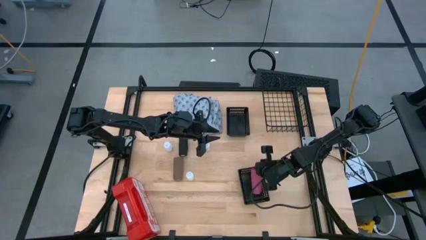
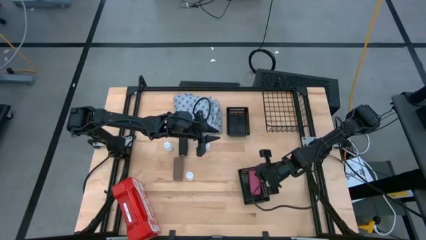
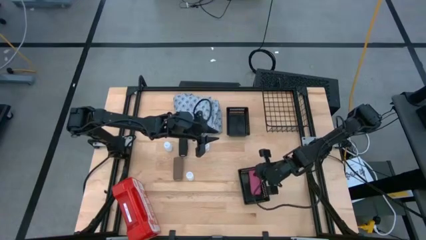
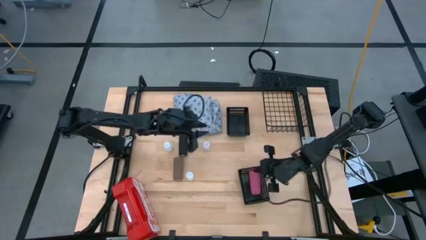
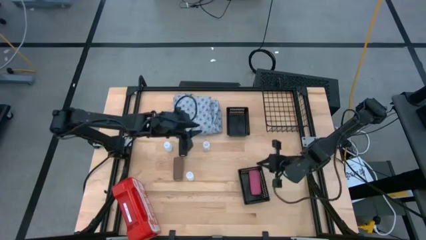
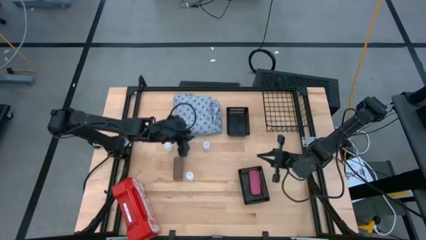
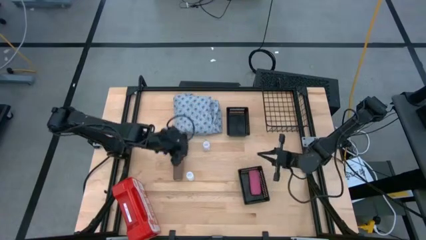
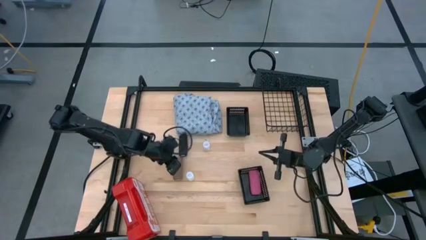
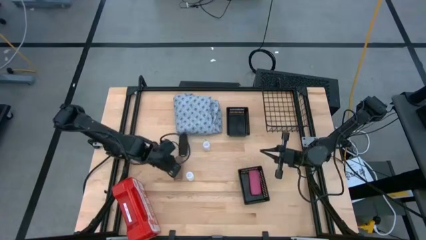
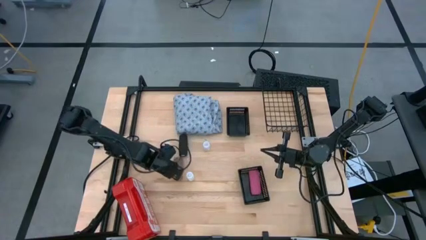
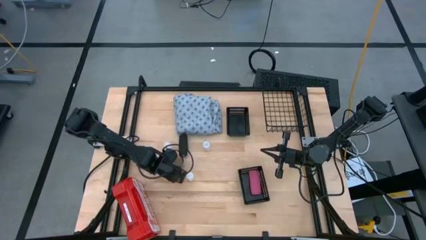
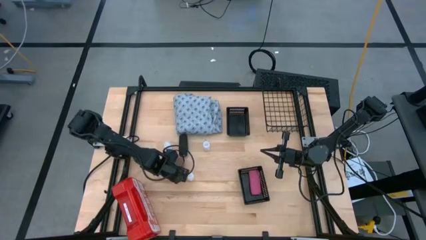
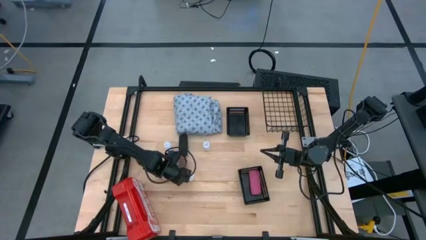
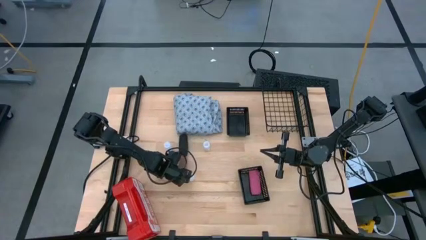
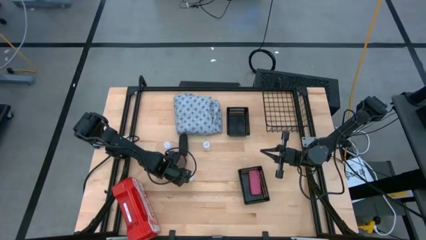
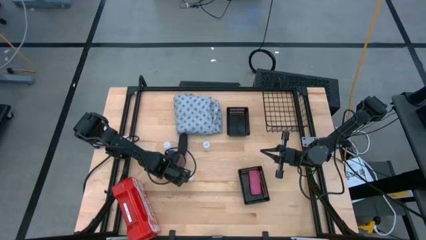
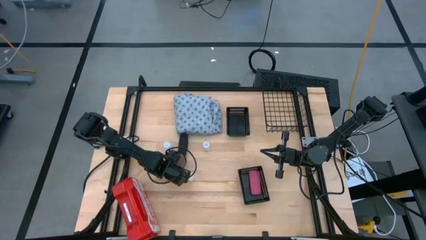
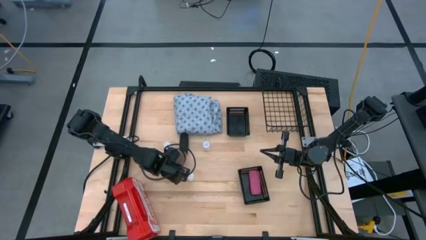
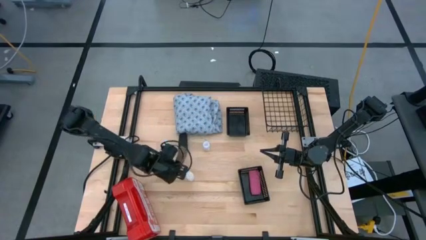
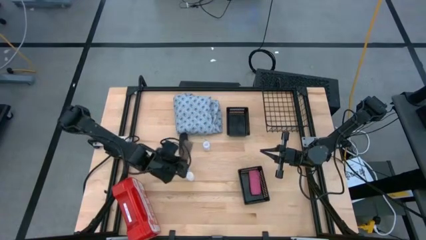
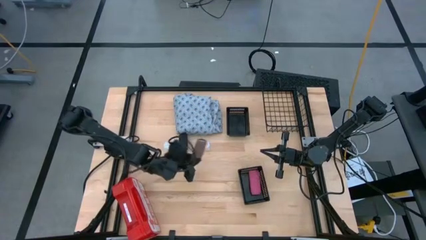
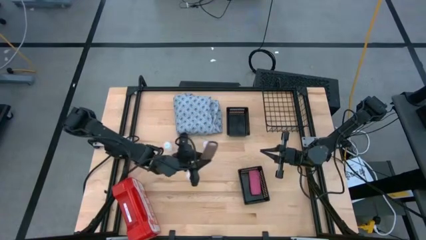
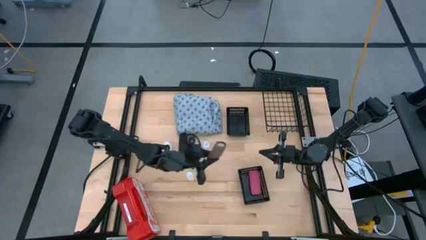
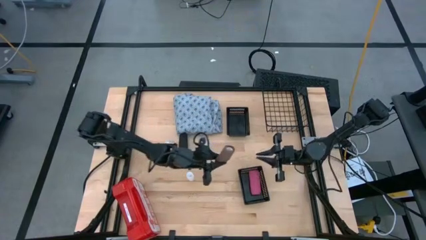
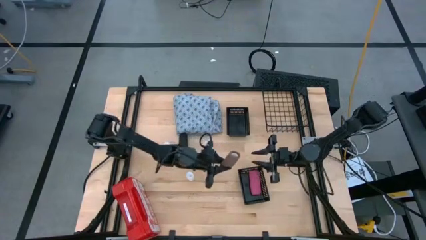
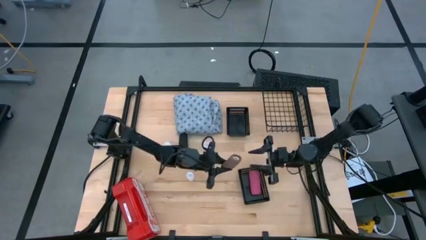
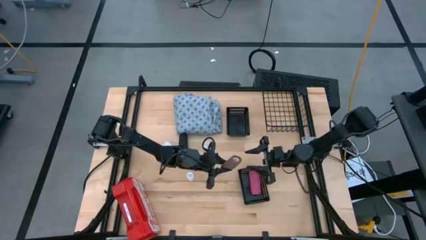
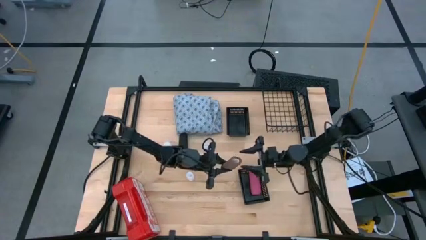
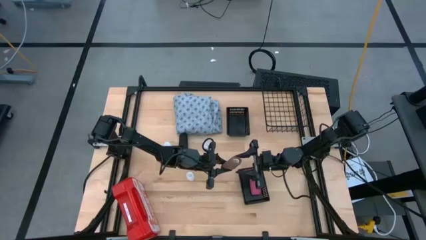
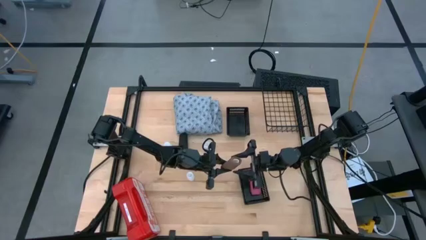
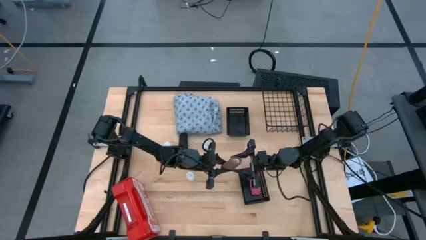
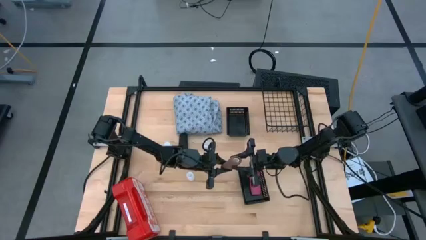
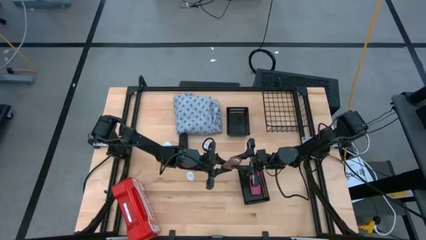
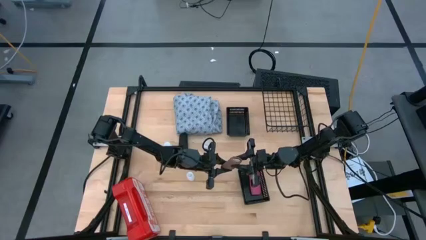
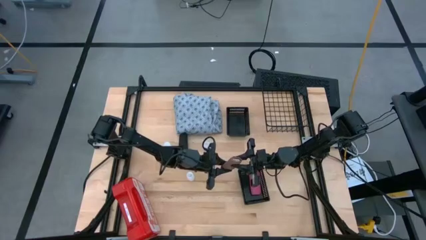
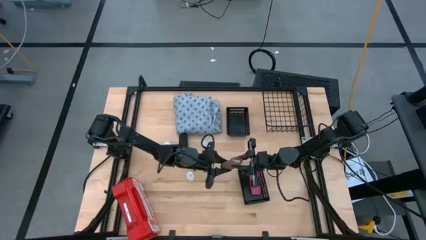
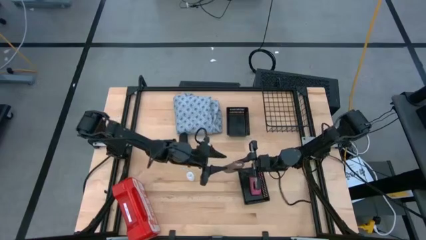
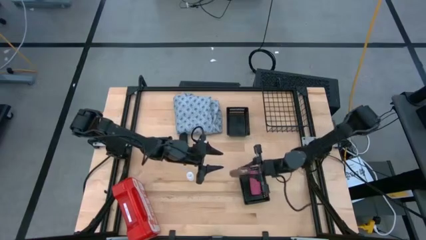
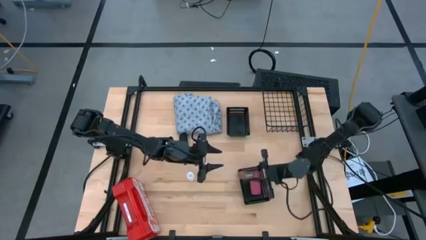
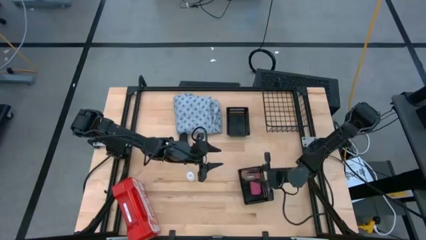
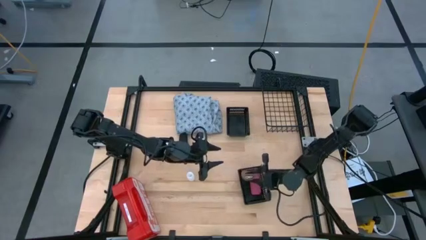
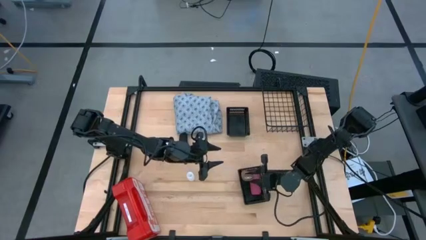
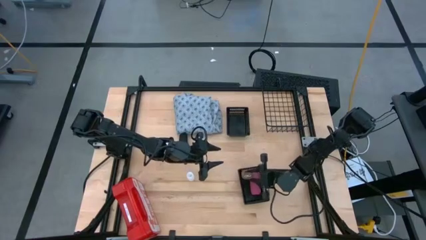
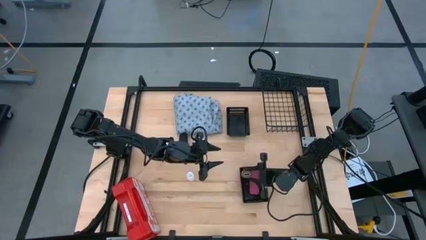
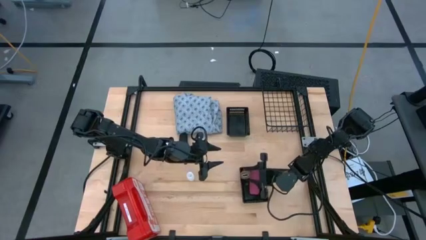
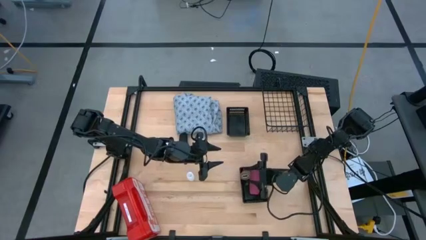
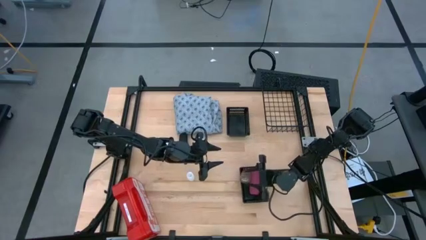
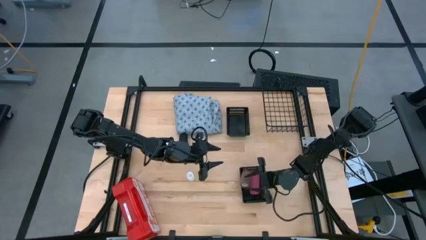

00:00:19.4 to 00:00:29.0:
Task: Pick & Place Medicine items
Put the brown bandage into the bottom black basket
